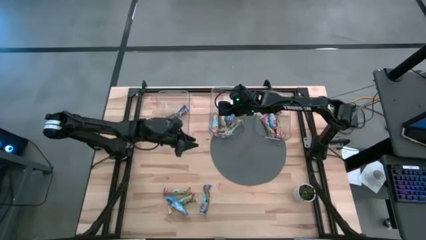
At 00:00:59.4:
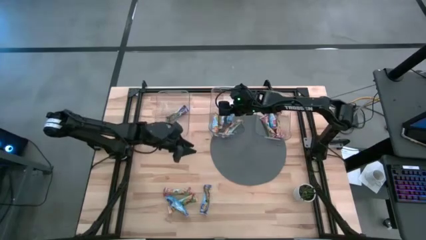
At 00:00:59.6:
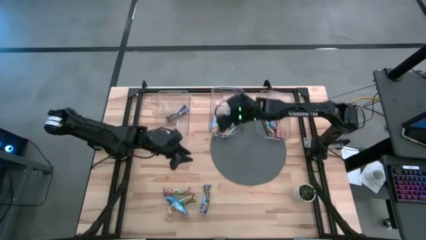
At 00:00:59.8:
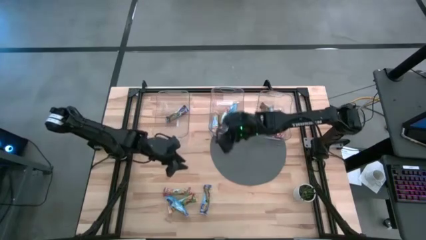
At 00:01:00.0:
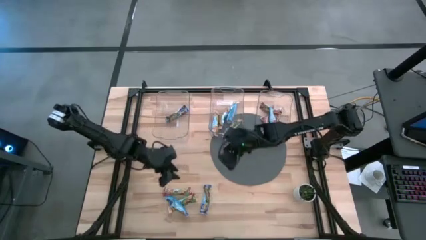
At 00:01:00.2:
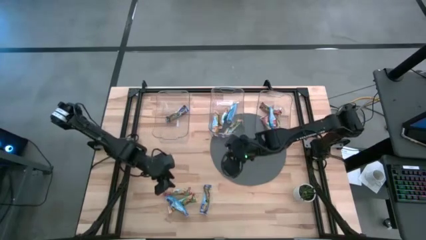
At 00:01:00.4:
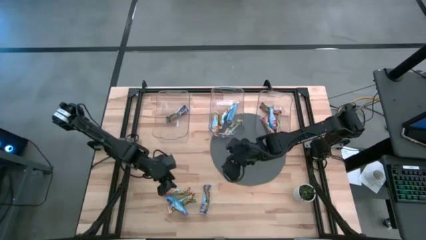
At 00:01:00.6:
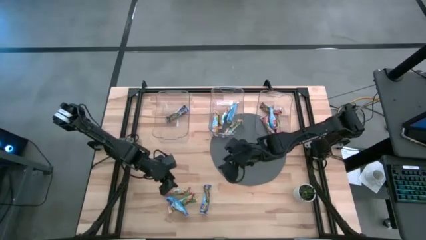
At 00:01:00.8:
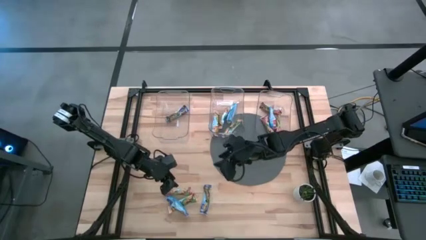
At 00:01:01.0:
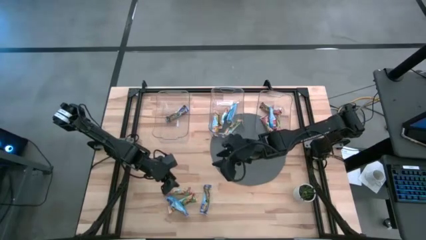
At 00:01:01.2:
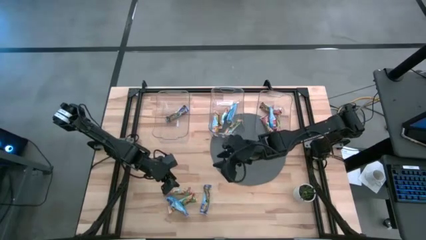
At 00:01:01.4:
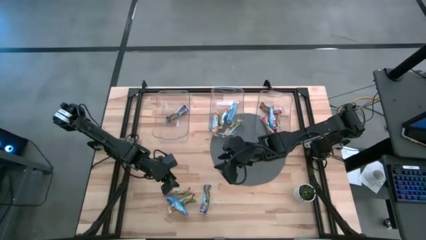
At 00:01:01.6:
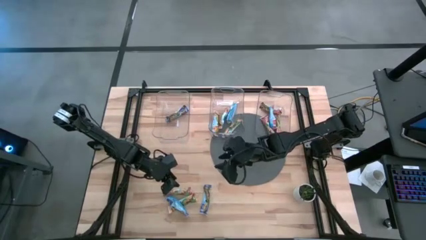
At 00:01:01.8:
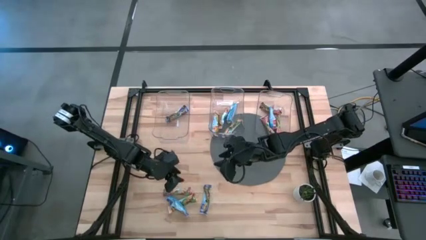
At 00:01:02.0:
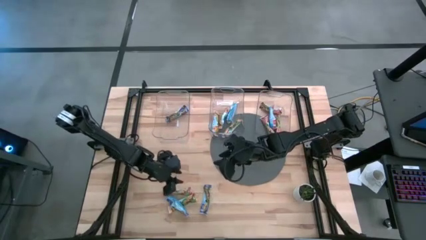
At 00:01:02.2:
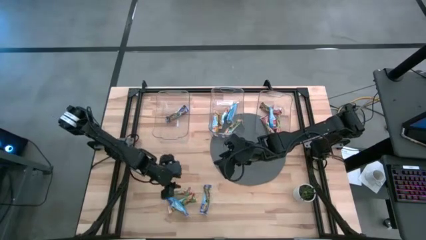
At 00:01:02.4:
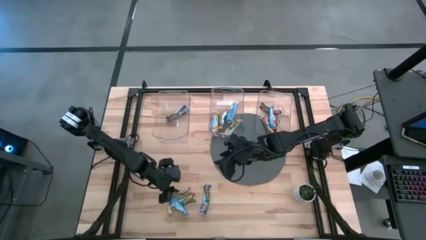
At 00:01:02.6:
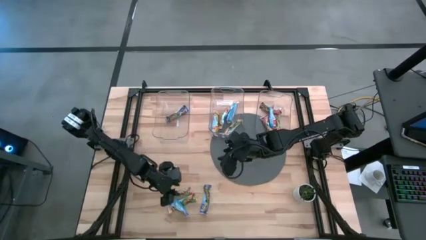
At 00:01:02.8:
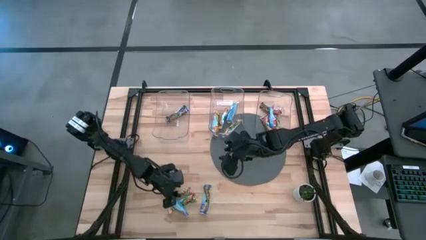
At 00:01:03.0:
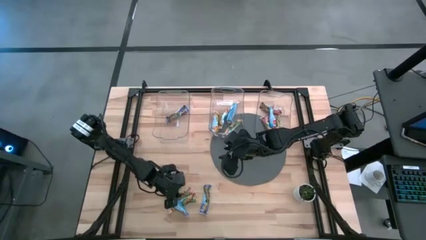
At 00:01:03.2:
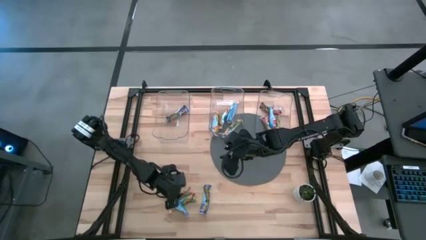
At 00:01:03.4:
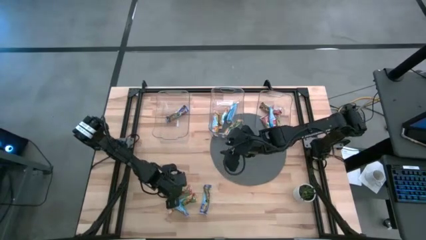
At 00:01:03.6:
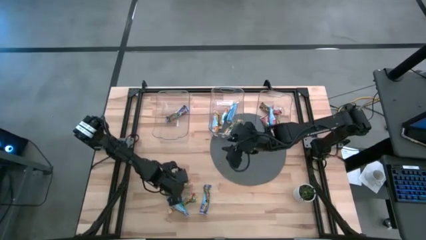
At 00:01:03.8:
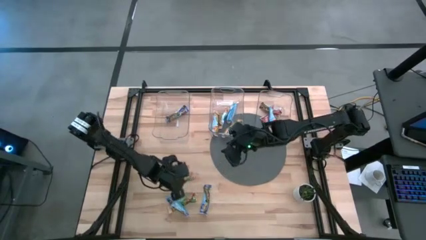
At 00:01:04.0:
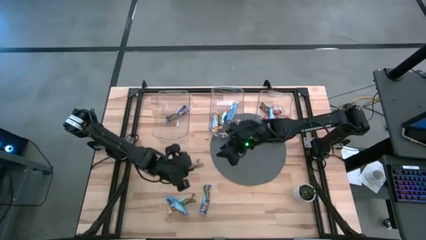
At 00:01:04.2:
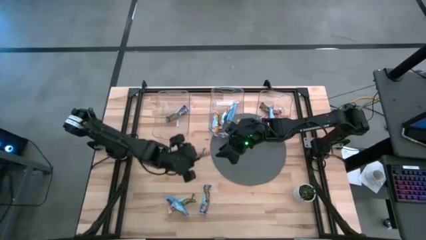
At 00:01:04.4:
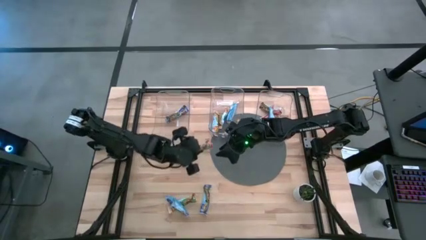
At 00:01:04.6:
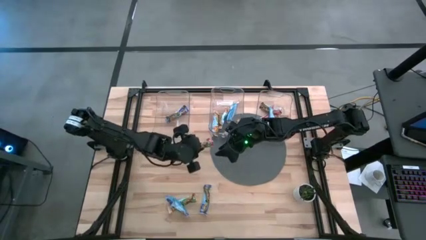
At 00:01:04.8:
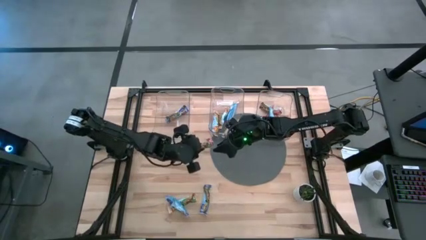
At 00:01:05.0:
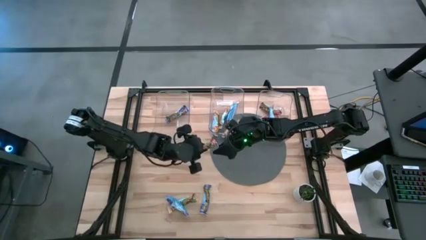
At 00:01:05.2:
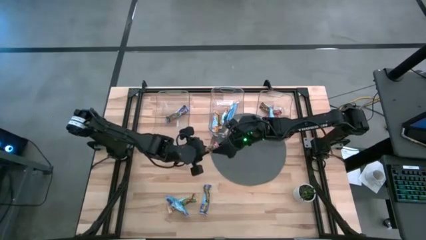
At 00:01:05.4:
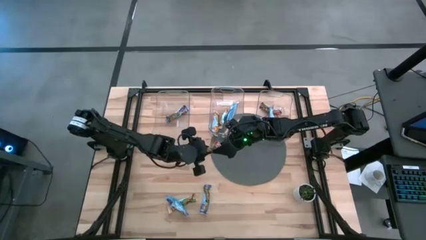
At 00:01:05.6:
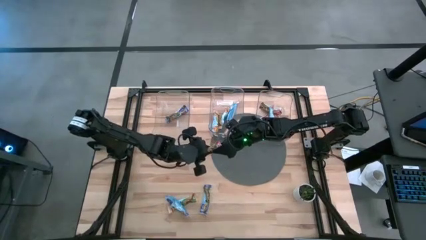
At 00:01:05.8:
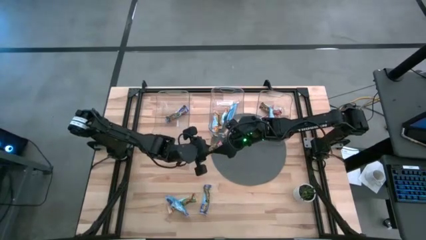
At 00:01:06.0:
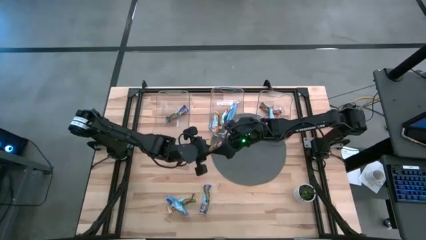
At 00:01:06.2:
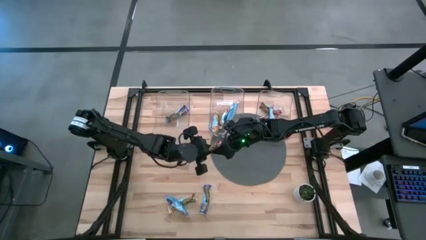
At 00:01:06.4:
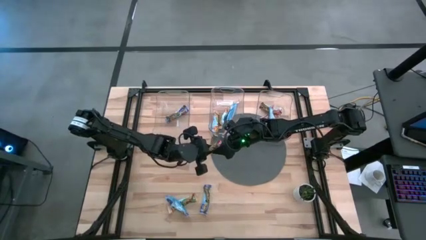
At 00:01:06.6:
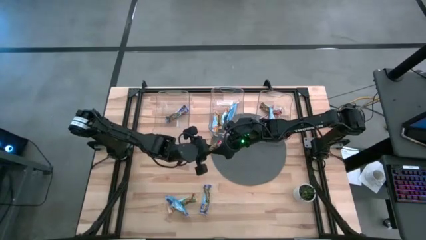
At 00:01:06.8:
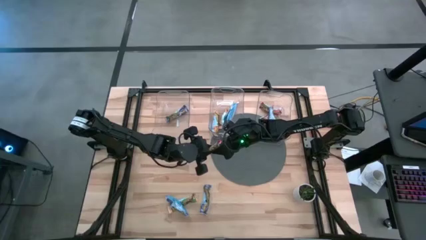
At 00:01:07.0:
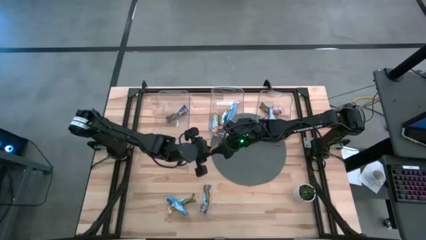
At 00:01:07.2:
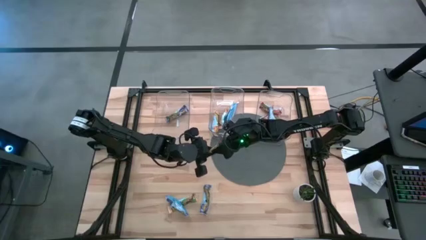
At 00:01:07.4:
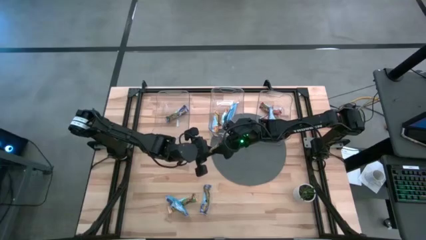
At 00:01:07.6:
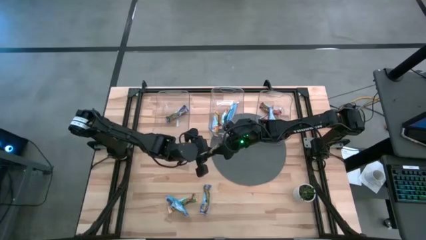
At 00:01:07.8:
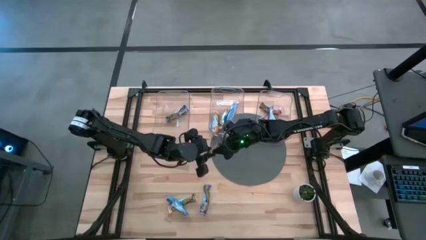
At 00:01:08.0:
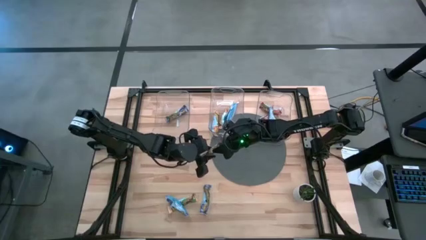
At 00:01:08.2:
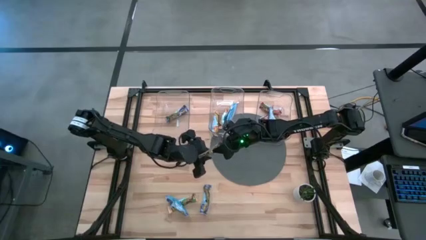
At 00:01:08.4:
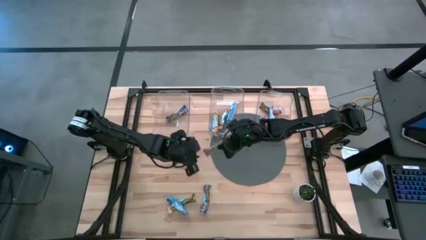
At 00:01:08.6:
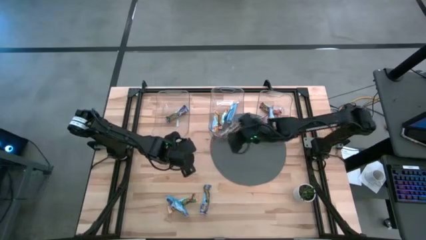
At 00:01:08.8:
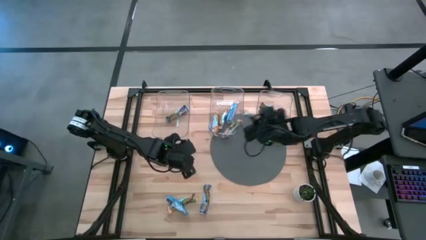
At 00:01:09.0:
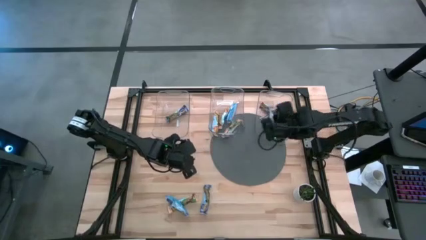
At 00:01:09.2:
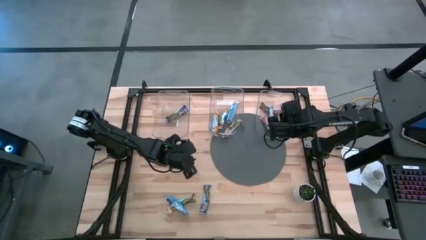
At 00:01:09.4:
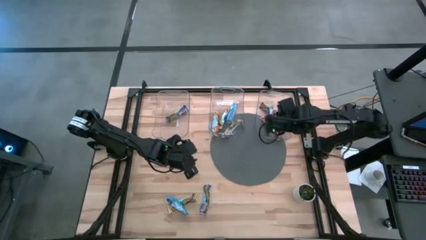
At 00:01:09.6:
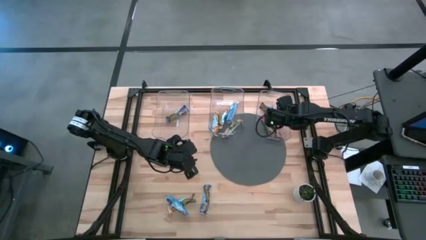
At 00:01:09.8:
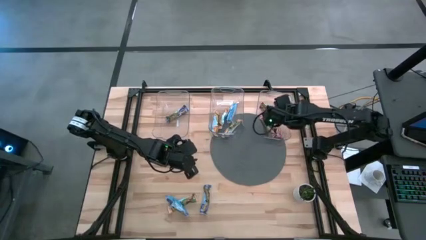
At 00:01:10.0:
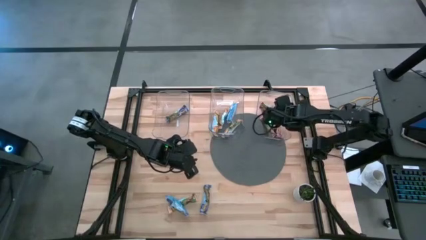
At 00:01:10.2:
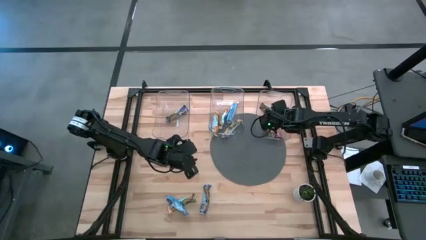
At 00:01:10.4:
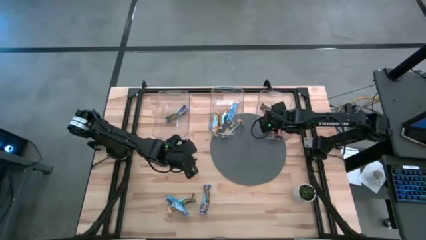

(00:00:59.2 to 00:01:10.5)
Task: Pick and place Granola Bars by type
Put the red granola bar into the right transparent bin

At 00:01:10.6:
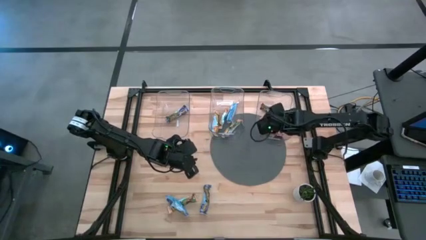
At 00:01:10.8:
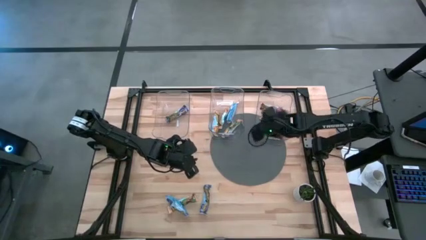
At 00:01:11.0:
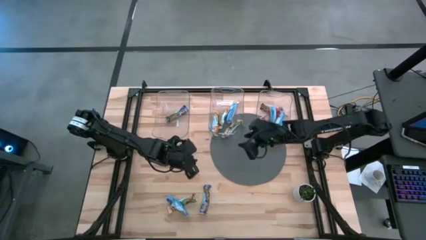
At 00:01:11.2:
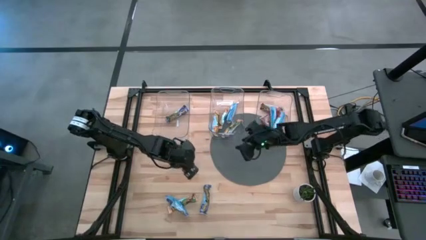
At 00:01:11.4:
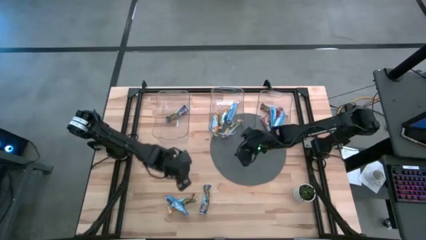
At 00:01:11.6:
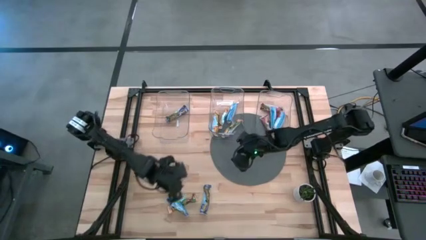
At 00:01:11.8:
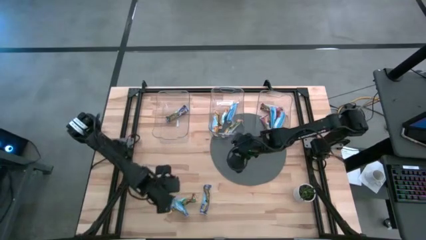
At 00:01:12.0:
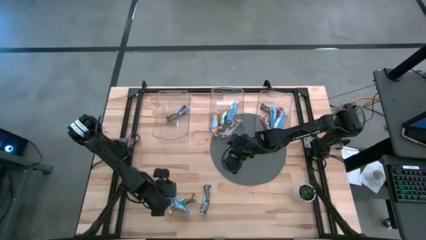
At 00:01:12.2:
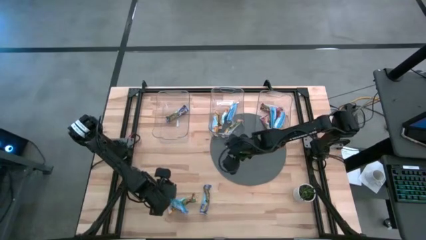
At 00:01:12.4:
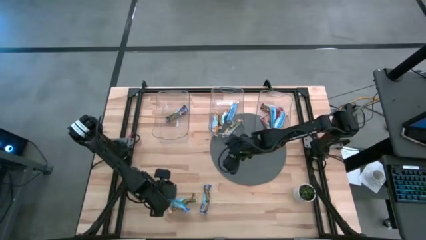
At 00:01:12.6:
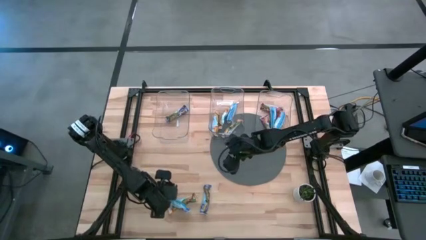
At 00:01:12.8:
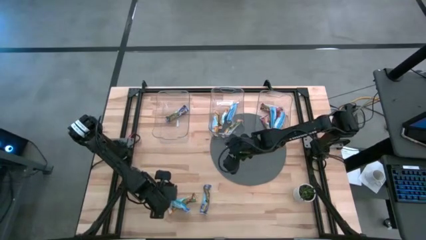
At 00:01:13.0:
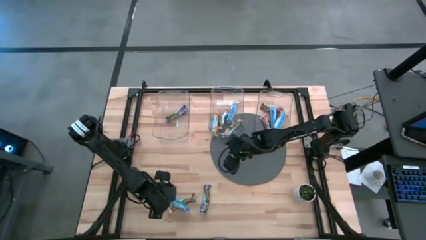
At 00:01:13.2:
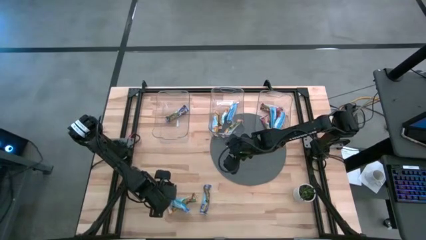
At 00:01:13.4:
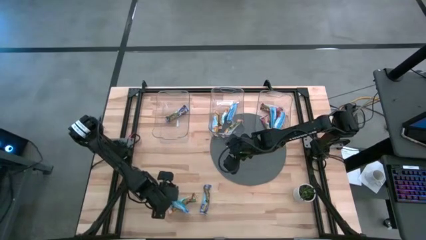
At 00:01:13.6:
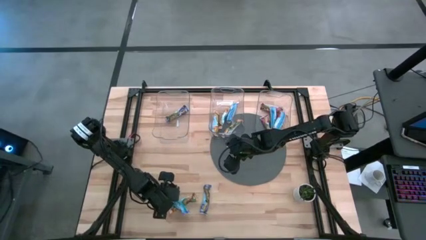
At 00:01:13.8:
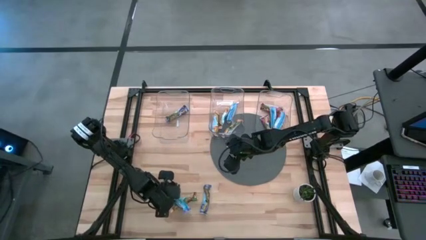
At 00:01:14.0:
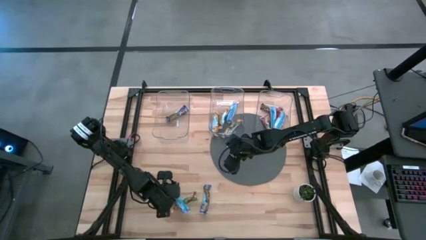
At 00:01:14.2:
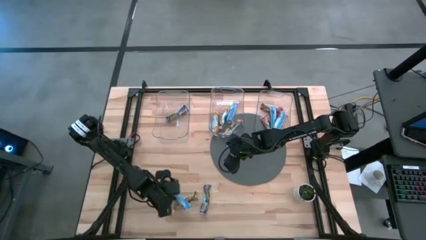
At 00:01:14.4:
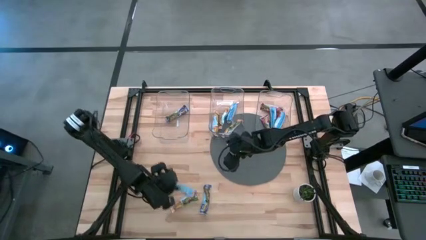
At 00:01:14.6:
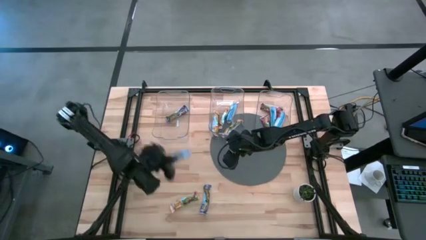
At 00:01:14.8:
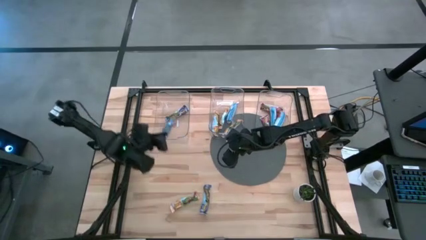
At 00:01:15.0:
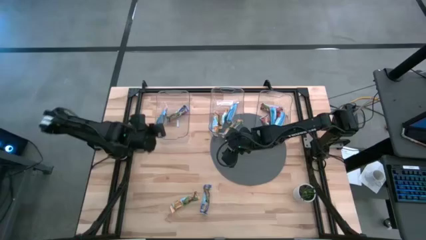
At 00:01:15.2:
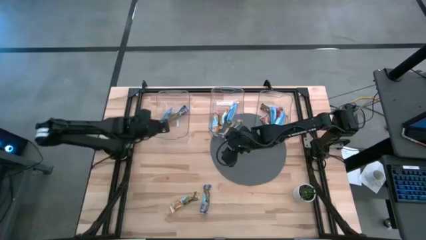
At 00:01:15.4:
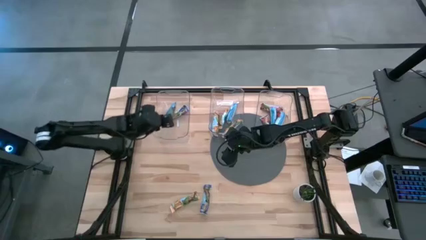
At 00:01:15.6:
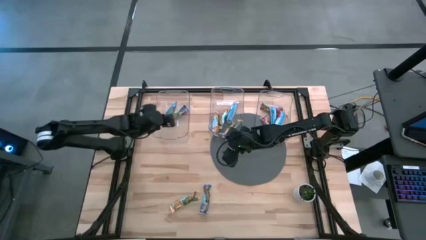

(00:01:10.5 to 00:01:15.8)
Put the blue granola bar into the left transparent bin
